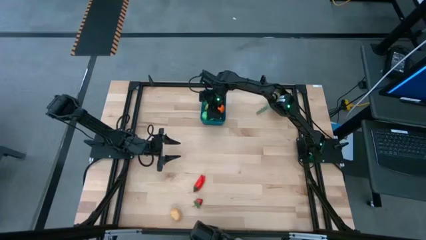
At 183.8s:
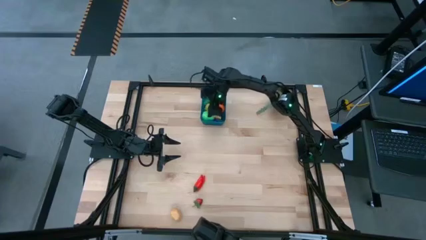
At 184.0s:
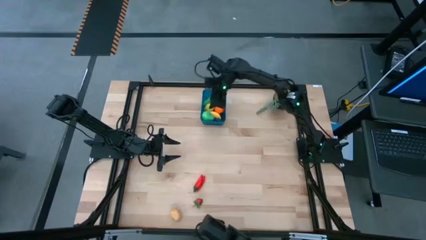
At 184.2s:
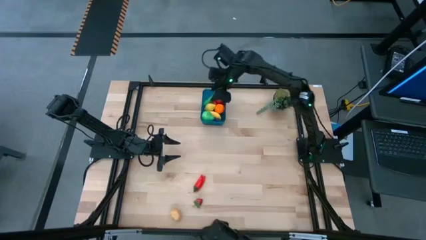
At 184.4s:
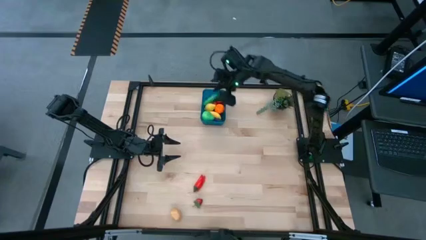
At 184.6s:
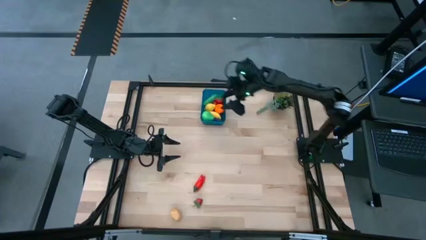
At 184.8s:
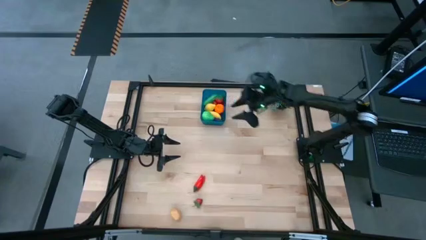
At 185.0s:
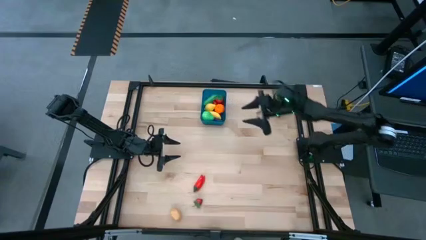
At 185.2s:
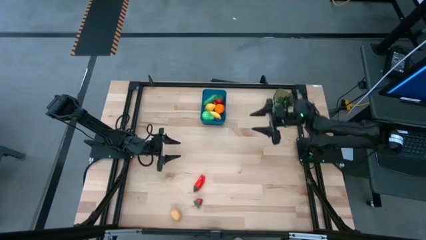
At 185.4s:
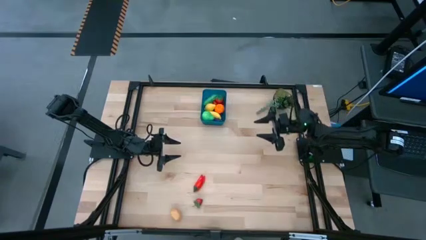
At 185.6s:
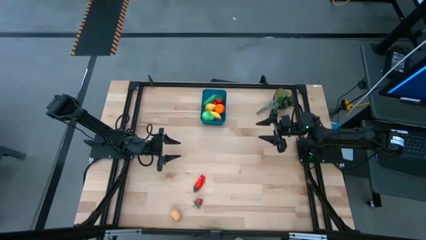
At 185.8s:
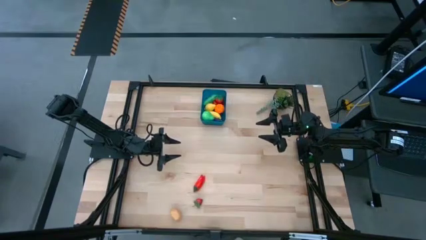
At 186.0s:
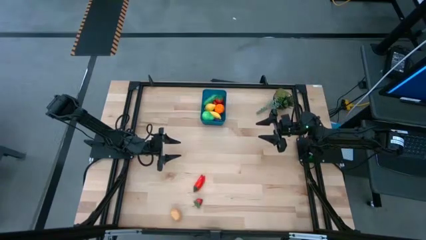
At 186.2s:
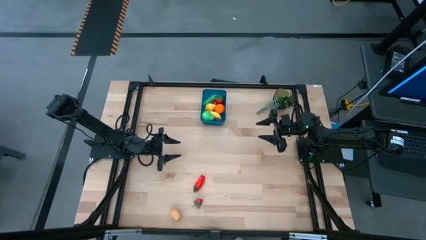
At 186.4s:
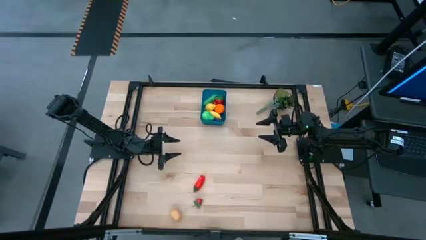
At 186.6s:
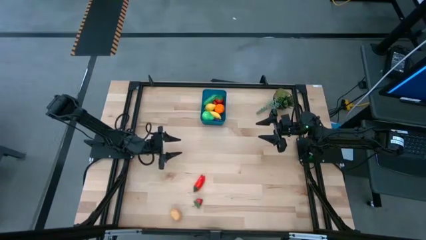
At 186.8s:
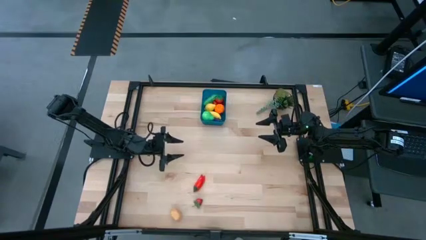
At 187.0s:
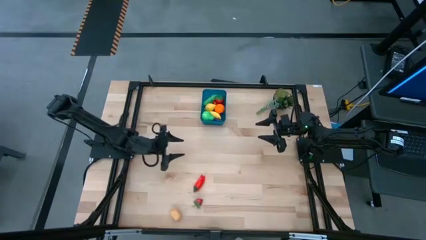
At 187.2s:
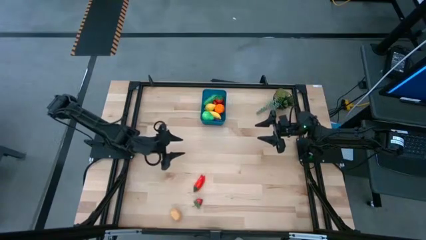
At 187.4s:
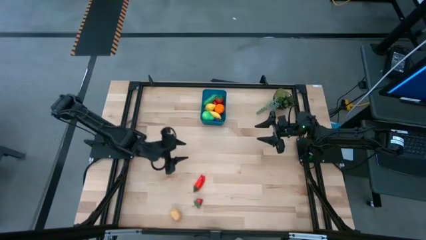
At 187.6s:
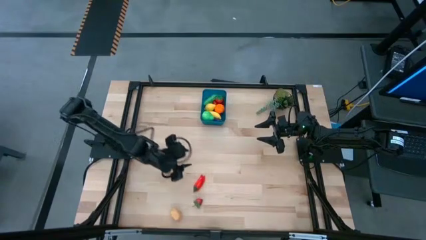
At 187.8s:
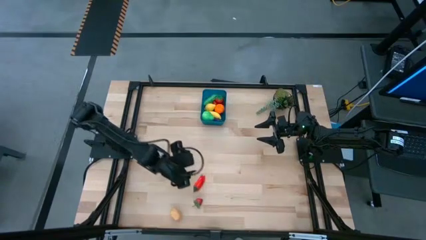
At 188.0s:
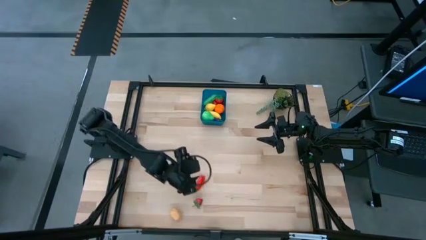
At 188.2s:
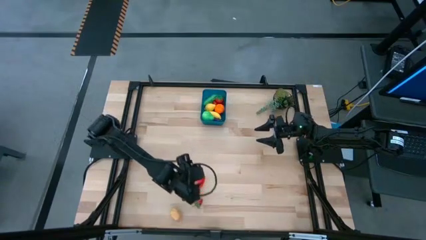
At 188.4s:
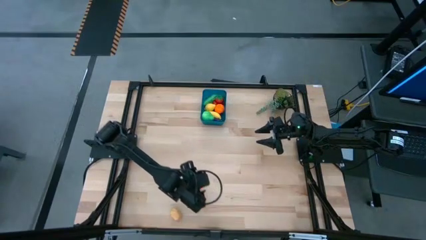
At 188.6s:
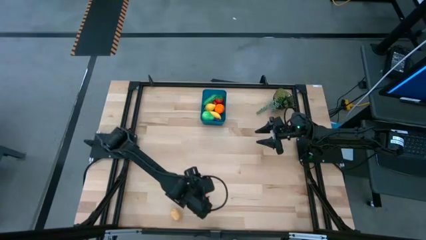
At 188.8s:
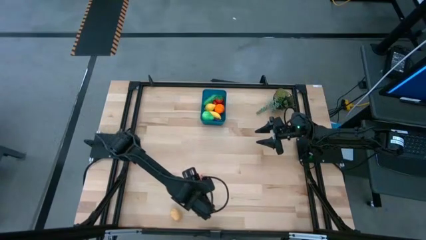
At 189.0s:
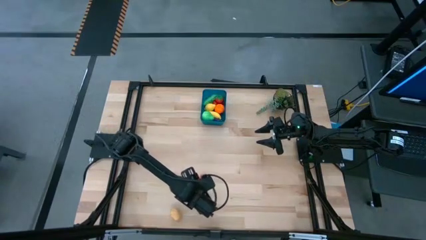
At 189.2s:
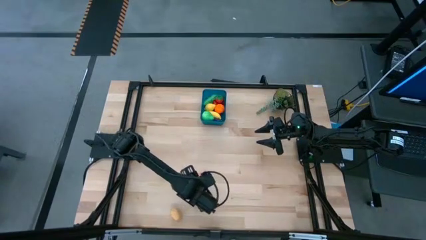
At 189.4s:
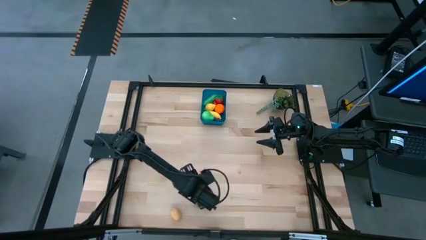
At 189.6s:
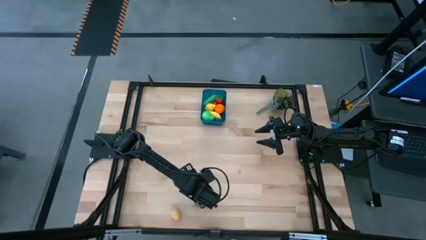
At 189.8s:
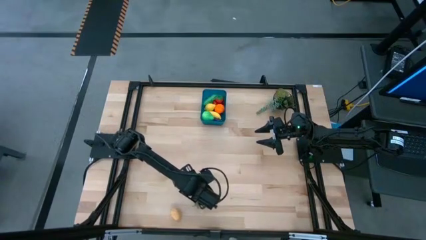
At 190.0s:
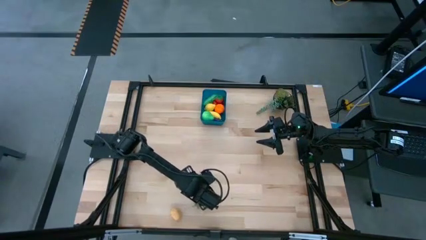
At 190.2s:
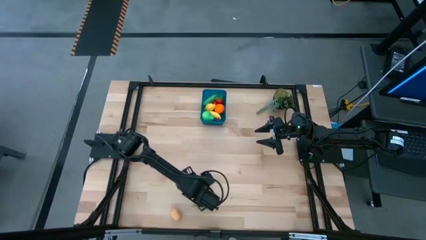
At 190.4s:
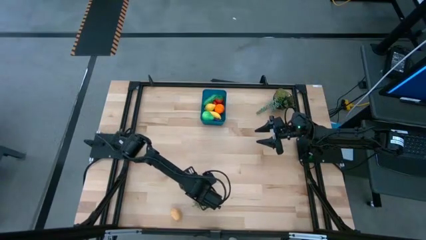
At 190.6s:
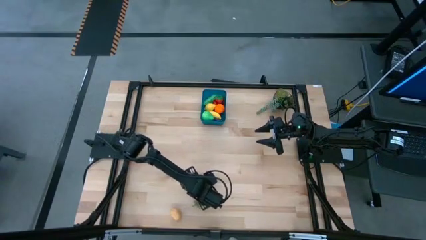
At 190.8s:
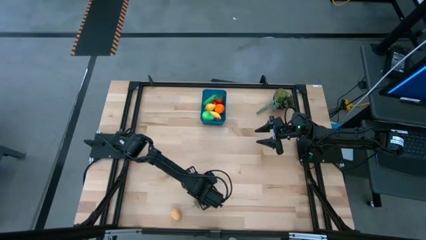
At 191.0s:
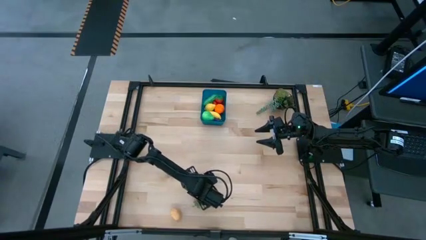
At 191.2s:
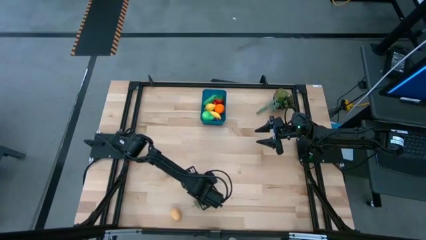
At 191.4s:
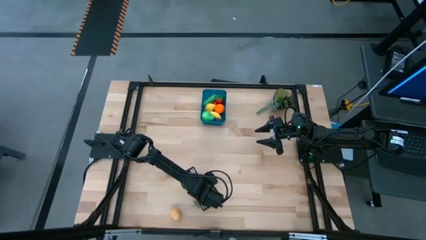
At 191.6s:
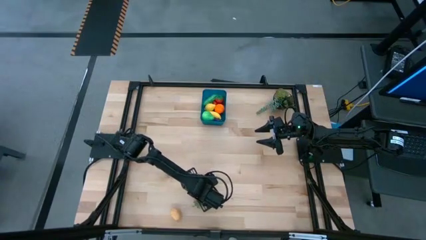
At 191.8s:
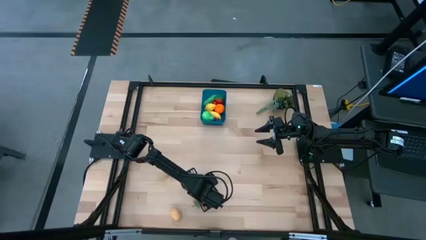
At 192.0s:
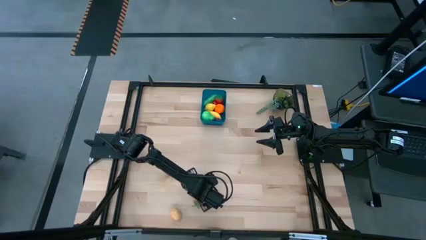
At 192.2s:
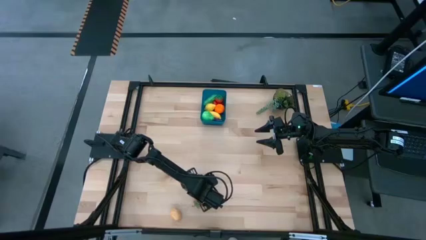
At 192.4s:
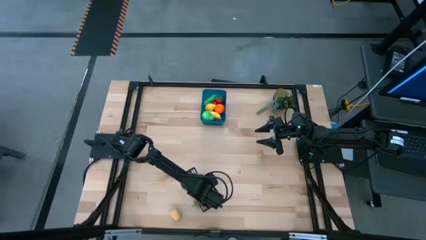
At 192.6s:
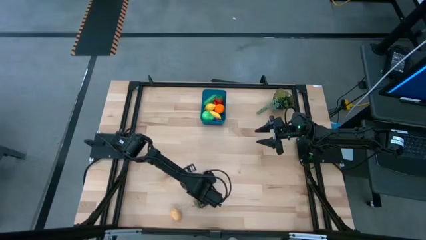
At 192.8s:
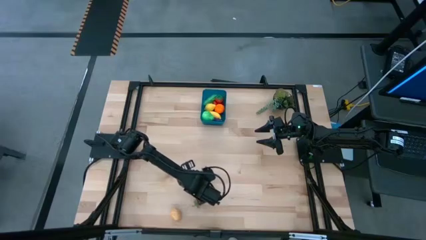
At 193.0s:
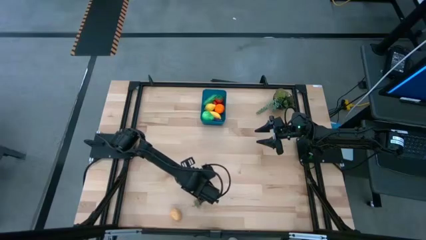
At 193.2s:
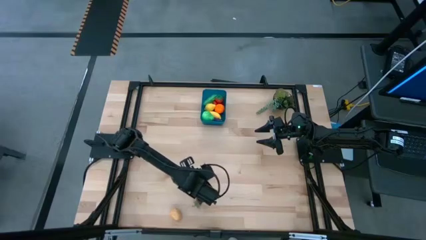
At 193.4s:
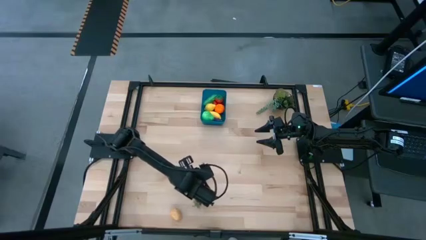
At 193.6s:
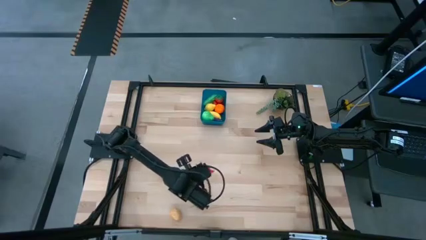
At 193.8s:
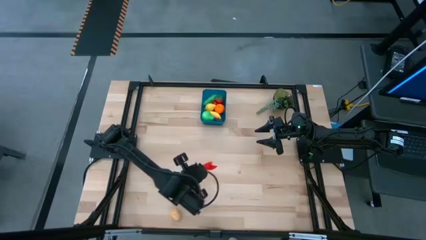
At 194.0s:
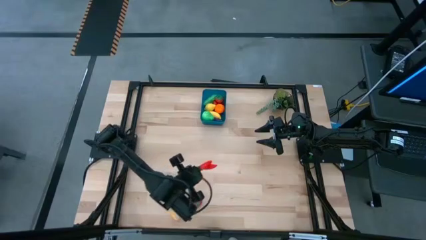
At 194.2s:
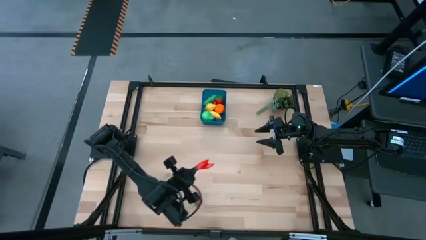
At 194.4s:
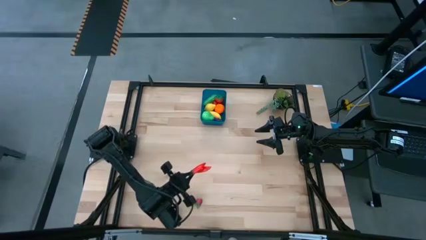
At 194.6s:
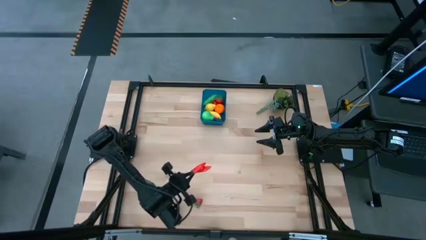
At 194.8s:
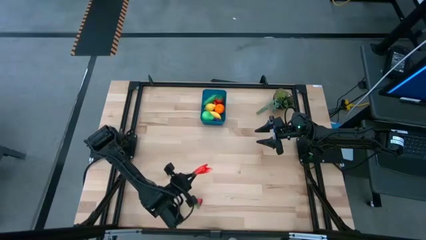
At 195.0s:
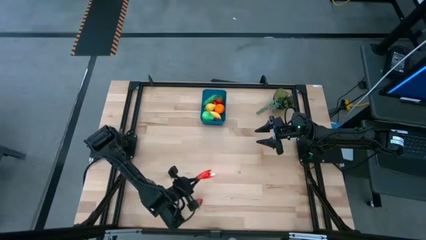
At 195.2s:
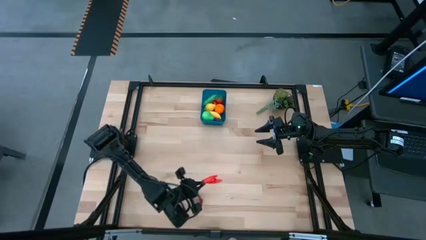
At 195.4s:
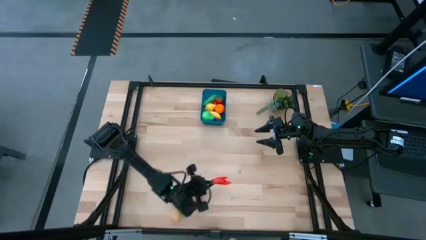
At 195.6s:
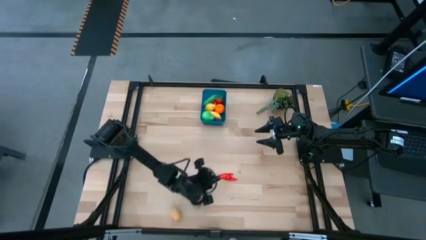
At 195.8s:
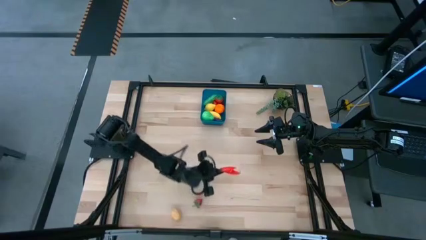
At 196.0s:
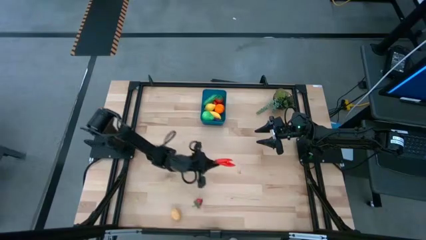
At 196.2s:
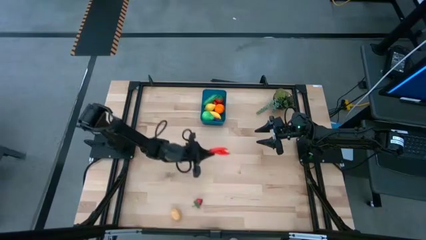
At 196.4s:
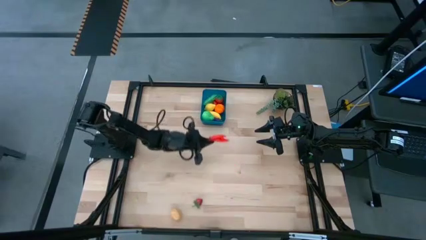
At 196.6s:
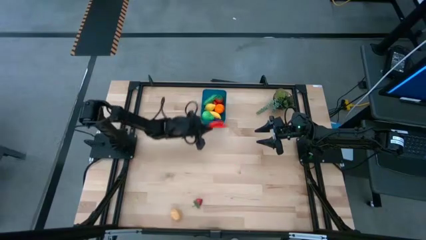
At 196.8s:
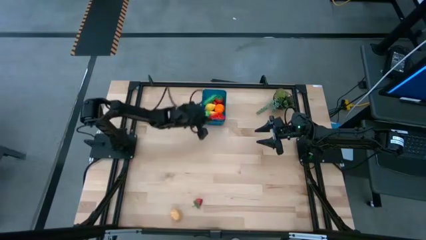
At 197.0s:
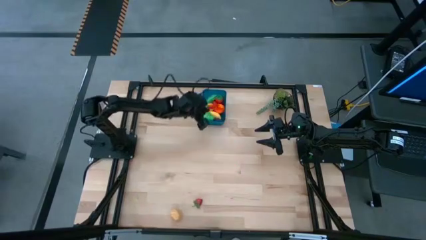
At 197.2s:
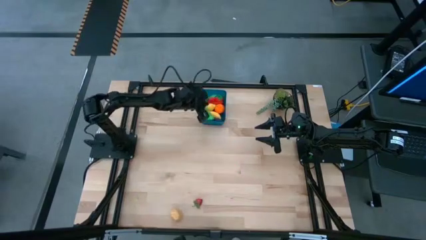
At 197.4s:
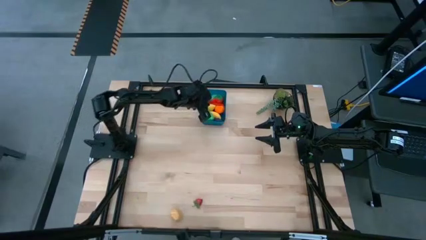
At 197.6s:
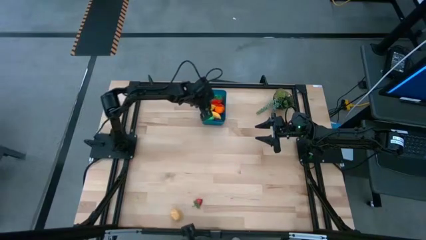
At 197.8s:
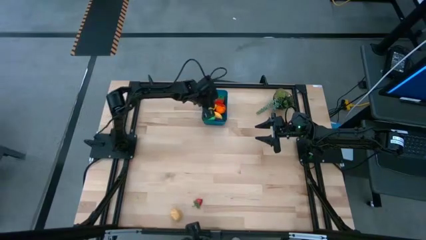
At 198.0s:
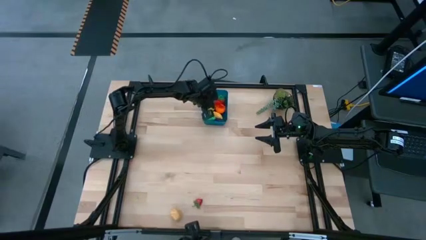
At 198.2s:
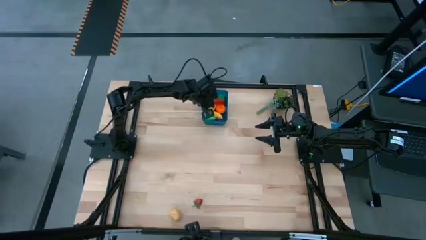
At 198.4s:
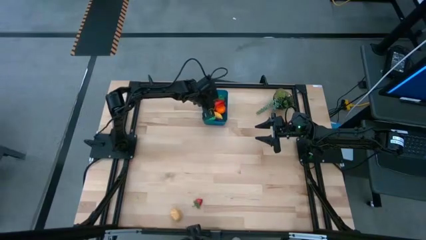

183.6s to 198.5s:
Task: Pick and placing Produce into tupperware
Put the chili pepper into the blue bin

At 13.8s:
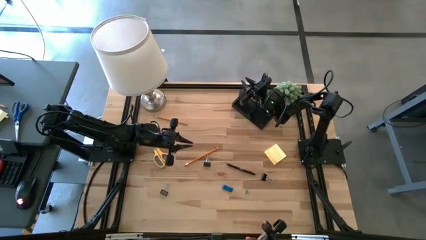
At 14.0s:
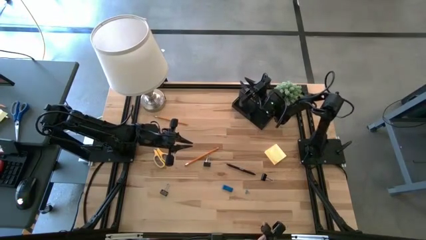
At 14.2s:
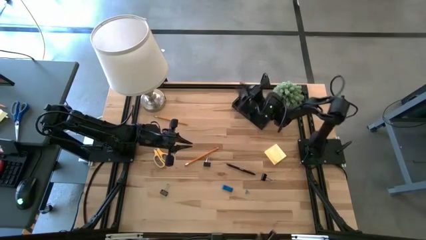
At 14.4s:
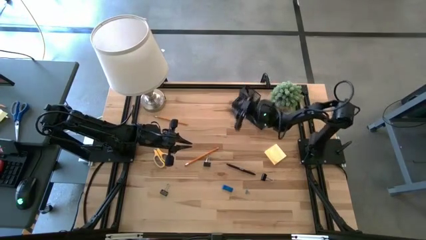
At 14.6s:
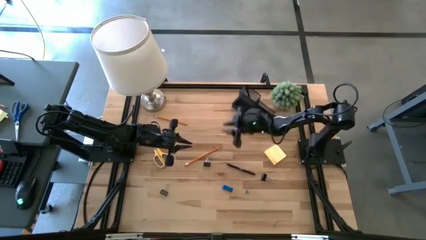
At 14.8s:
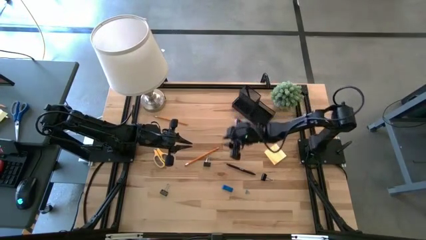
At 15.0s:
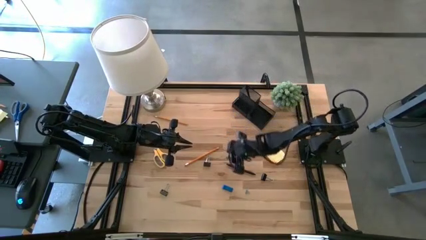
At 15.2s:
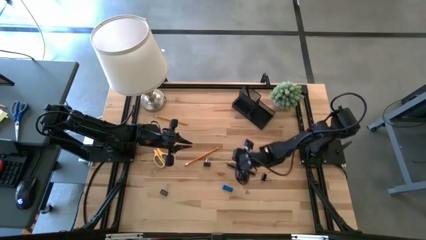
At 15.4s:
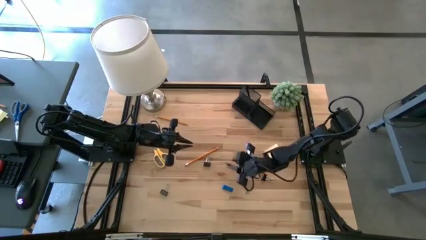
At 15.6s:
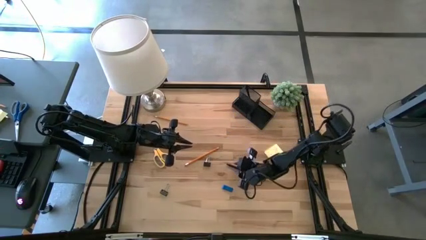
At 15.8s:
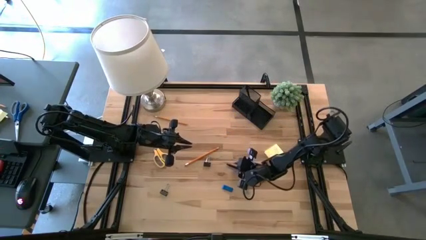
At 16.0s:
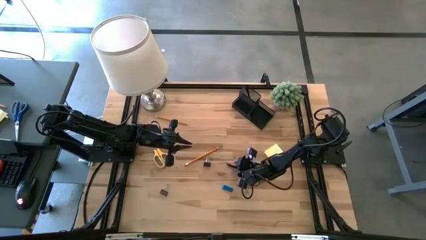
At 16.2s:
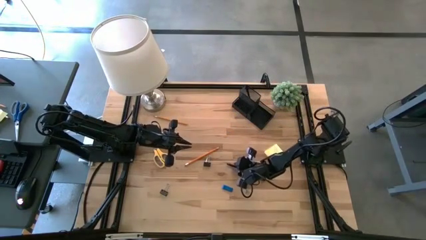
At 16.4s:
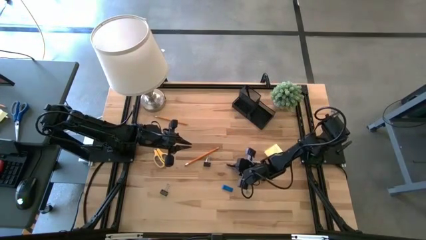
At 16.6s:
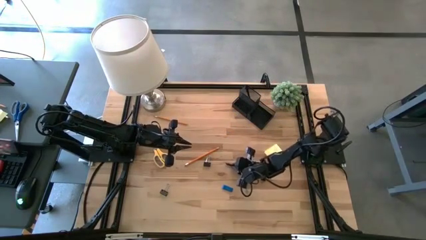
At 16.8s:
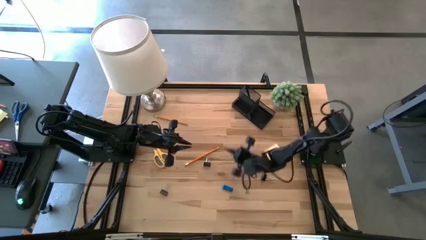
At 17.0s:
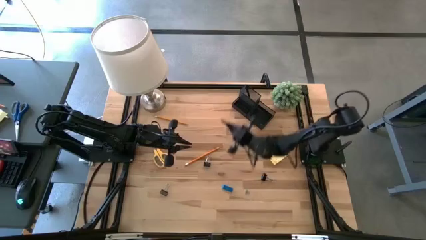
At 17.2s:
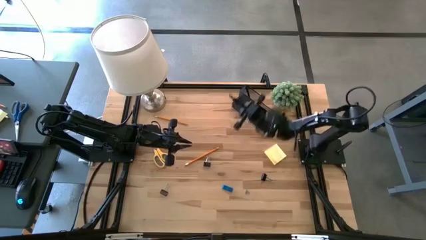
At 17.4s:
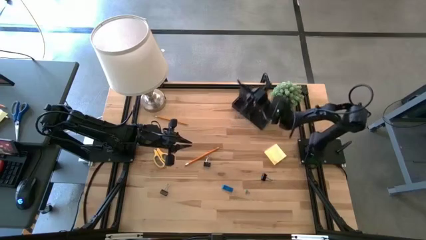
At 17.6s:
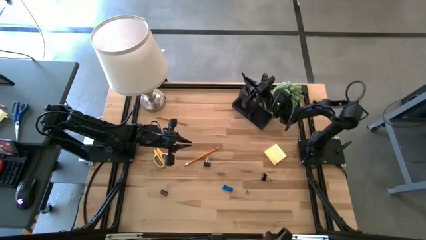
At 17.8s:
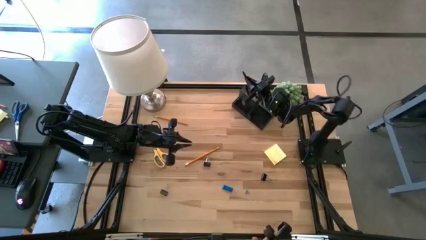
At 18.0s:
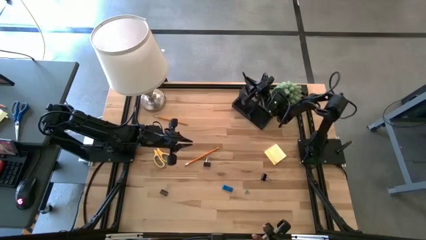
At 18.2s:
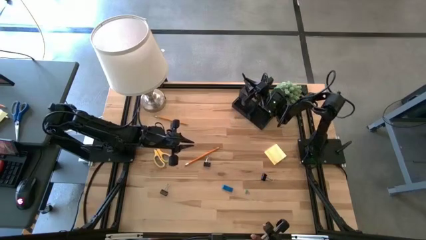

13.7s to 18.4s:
Task: Pick and place office supplies into organizer
Put the black pen into the desk organizer
